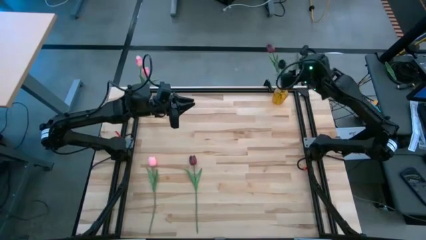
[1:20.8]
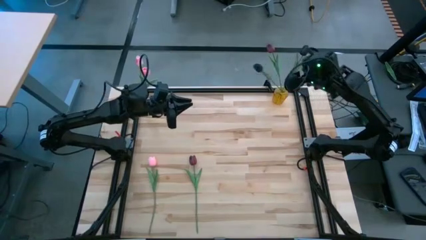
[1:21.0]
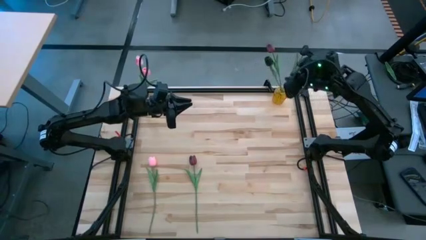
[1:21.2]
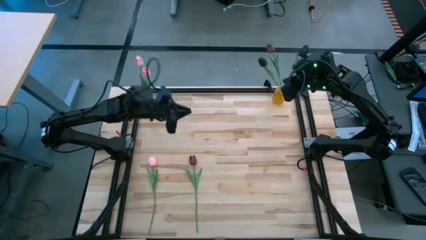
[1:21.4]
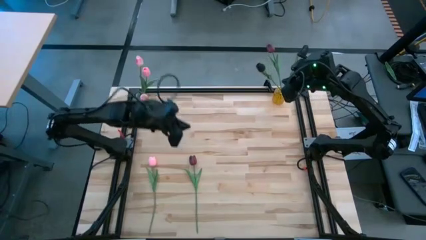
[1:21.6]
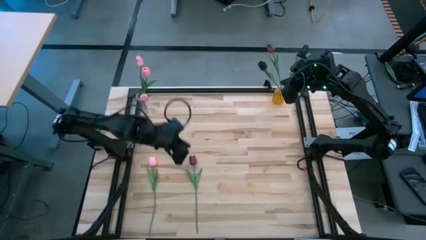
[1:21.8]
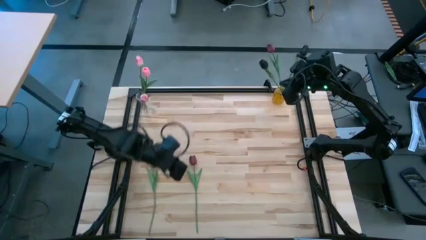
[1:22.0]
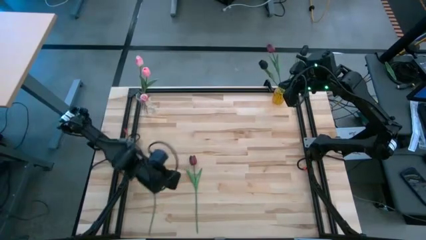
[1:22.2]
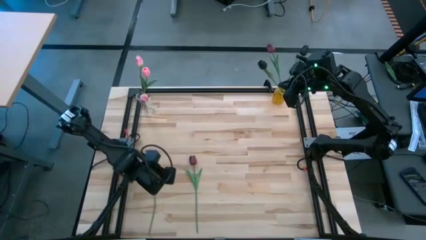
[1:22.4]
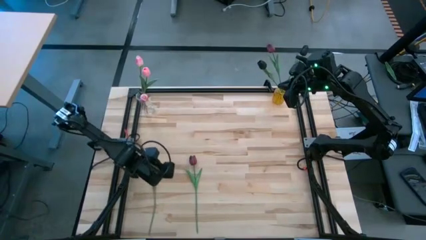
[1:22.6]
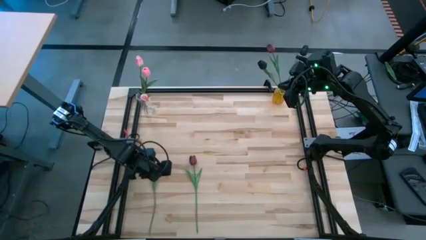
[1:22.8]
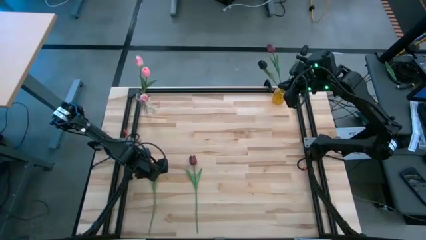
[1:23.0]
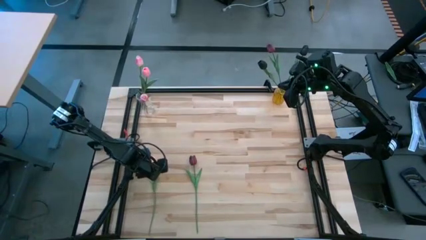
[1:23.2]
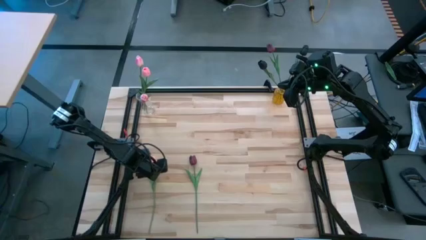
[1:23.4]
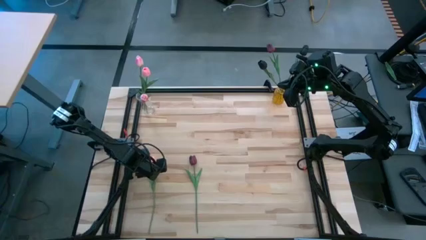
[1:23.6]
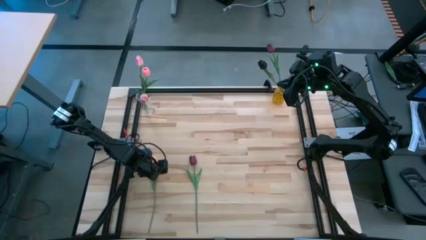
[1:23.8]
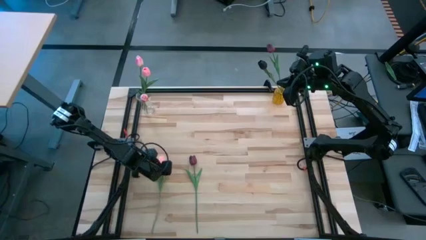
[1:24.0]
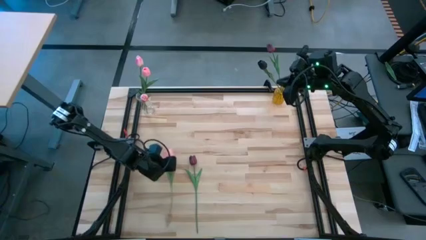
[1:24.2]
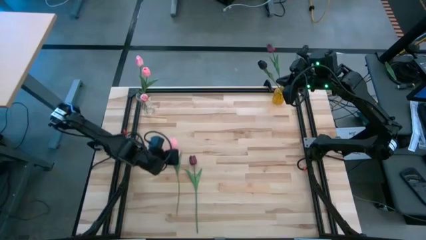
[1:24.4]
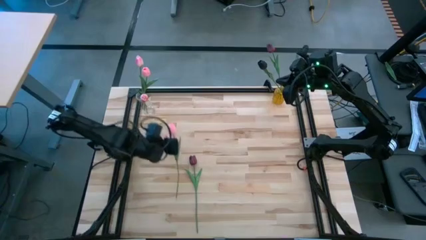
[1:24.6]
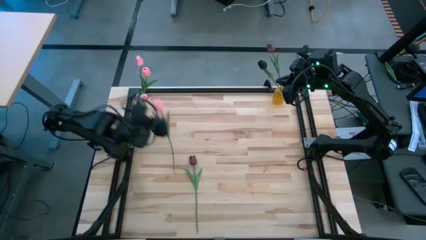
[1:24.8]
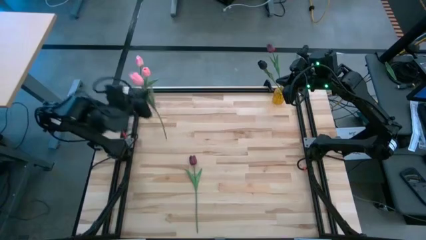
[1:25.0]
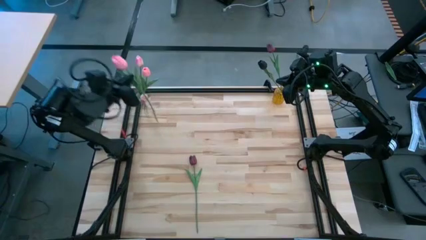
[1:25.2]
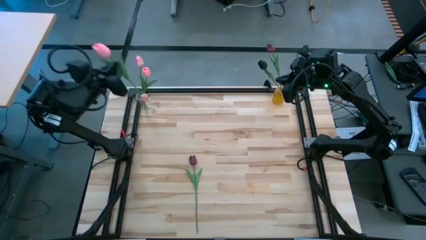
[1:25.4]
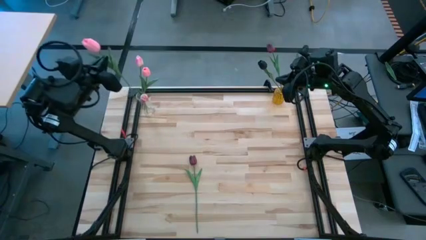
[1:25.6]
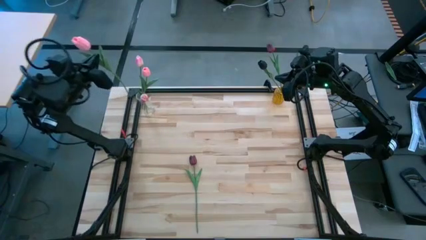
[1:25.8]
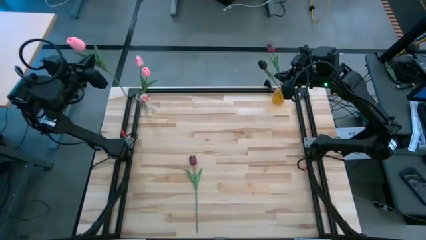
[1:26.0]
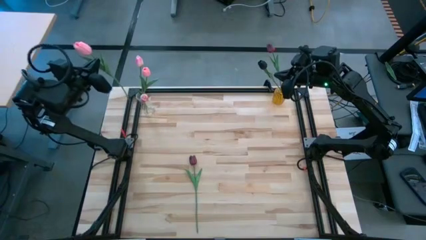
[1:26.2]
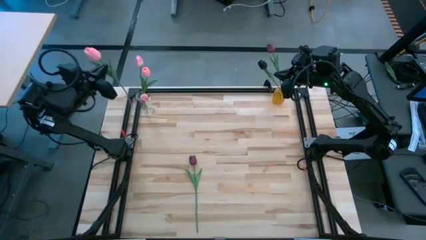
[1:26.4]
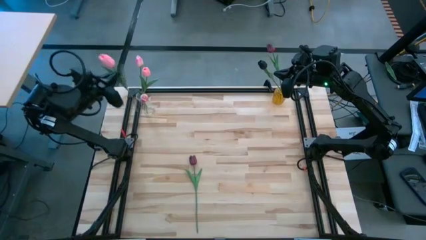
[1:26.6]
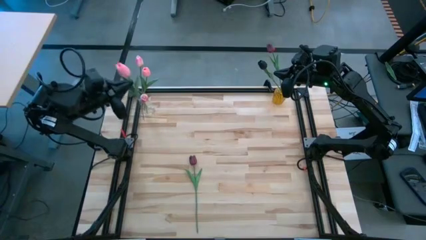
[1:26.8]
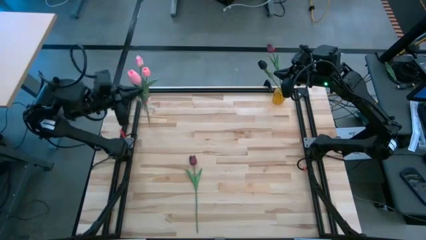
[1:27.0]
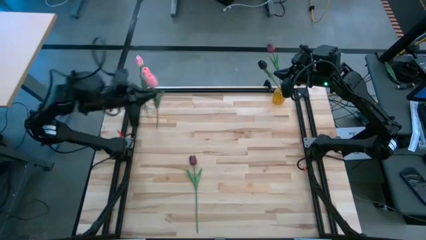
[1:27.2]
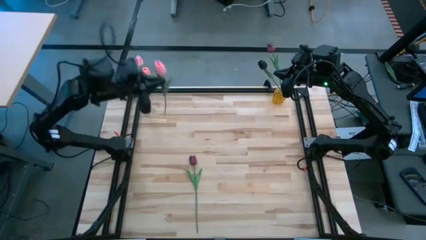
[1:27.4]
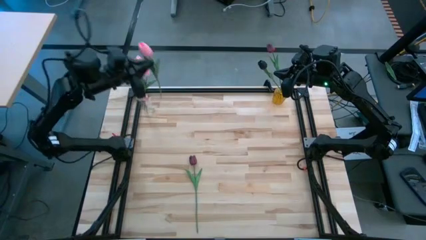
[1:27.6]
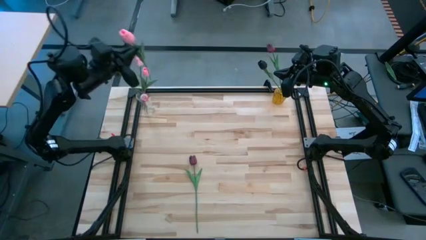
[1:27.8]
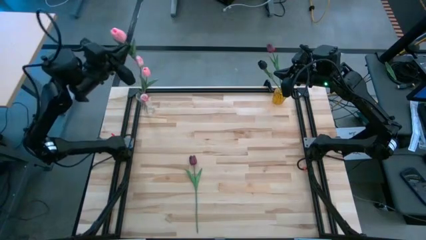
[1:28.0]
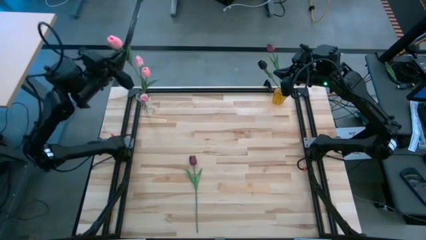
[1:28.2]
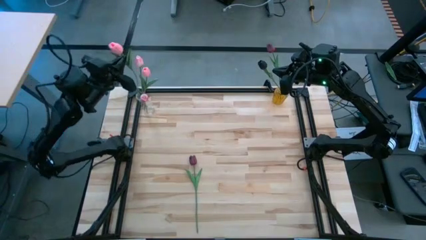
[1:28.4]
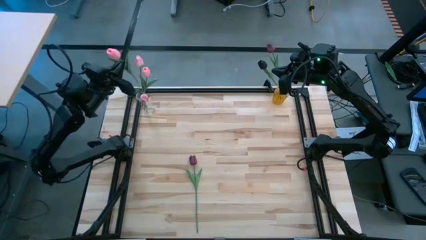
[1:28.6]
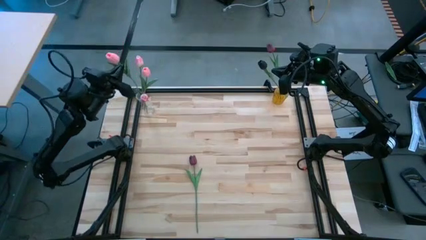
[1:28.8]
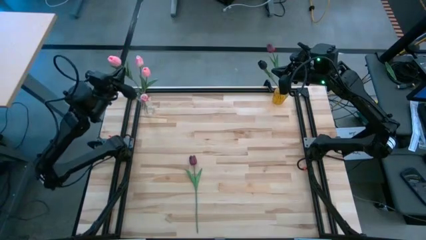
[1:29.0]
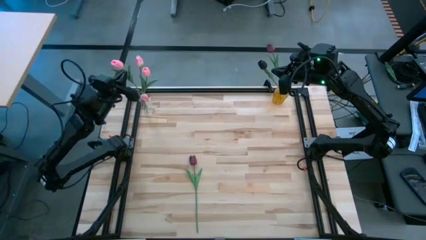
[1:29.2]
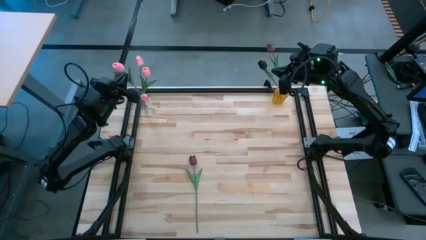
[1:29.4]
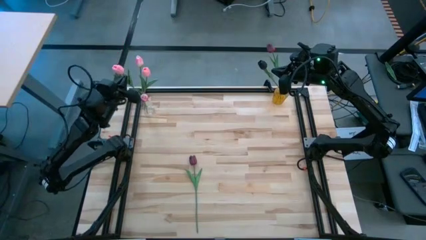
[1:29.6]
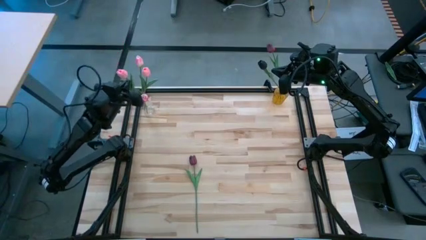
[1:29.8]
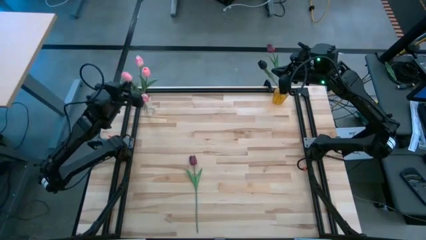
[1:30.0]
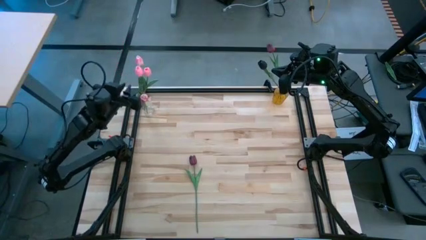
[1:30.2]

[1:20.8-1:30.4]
Task: Sort flowers into vase by color
Put the pink flower into the transparent vase

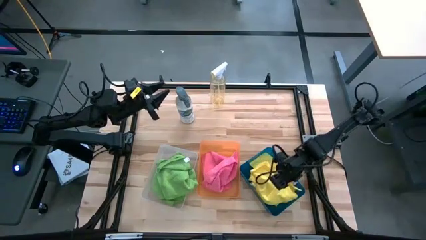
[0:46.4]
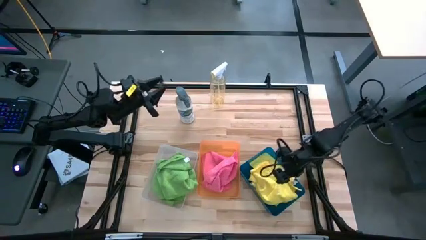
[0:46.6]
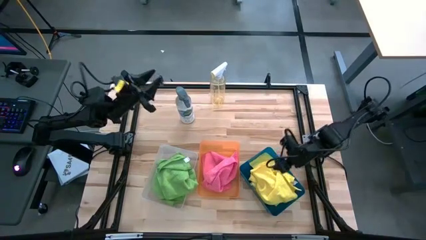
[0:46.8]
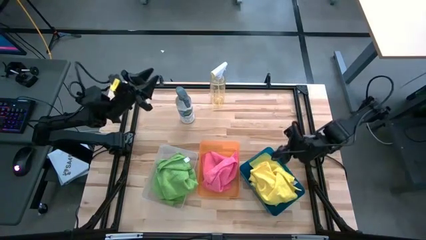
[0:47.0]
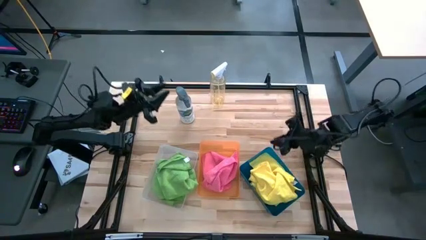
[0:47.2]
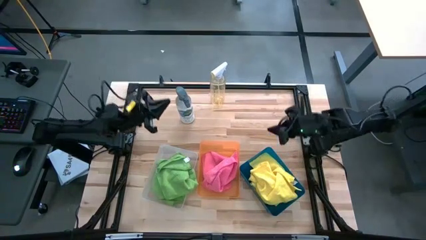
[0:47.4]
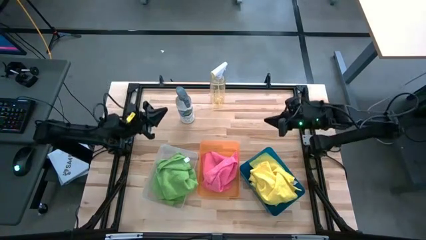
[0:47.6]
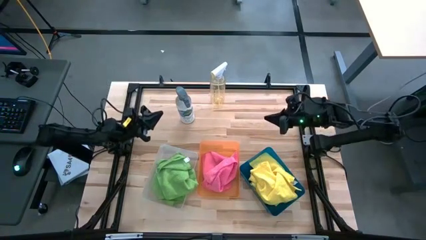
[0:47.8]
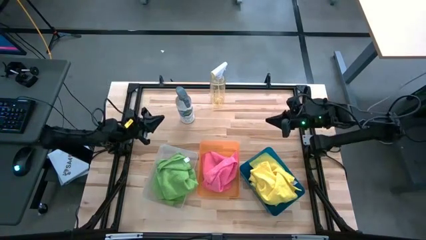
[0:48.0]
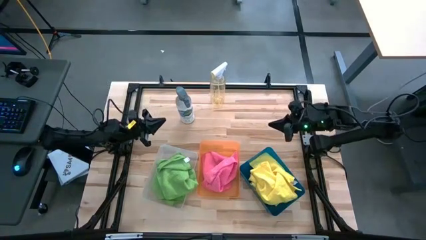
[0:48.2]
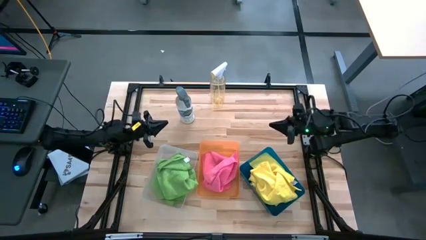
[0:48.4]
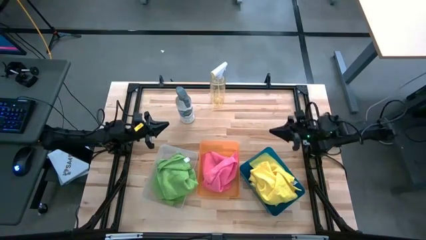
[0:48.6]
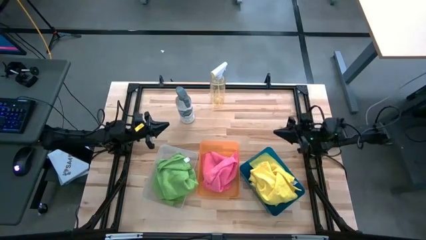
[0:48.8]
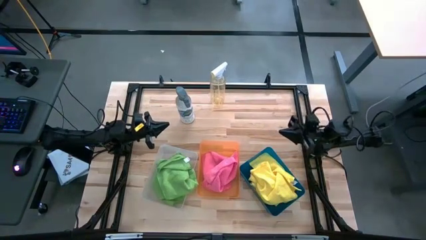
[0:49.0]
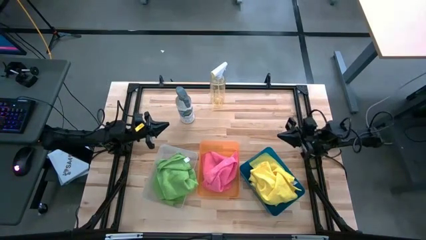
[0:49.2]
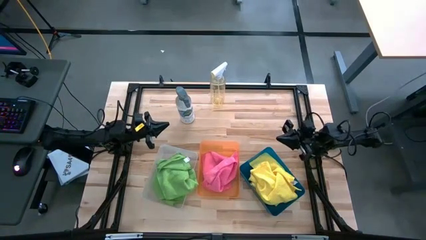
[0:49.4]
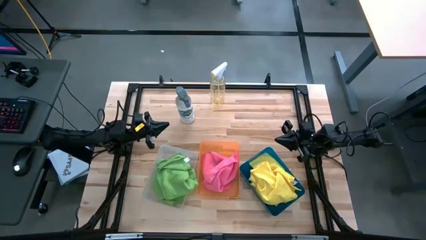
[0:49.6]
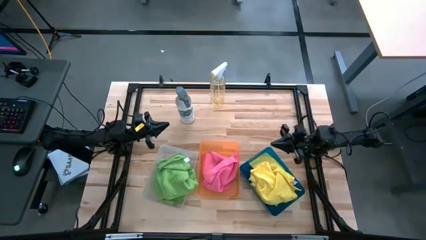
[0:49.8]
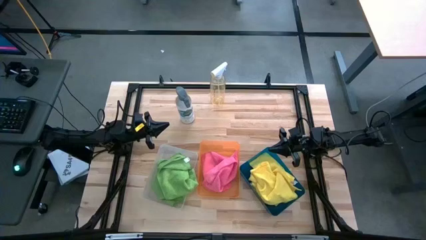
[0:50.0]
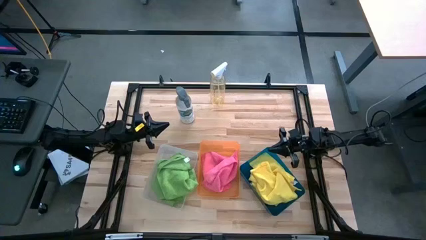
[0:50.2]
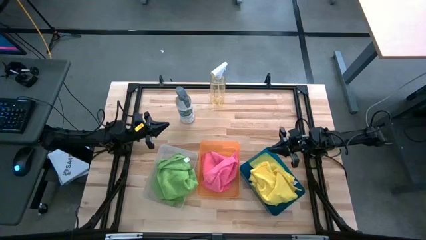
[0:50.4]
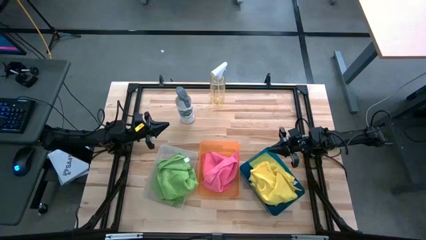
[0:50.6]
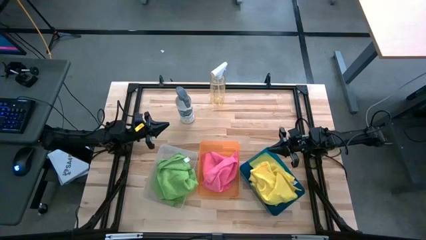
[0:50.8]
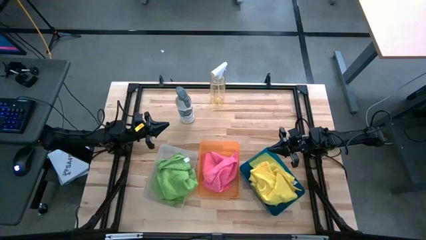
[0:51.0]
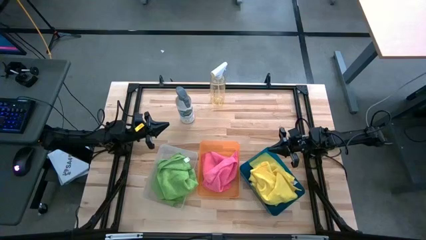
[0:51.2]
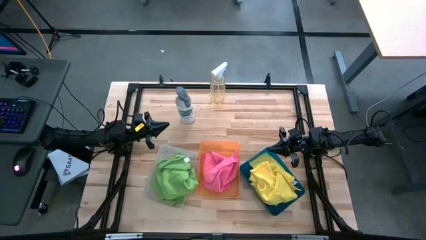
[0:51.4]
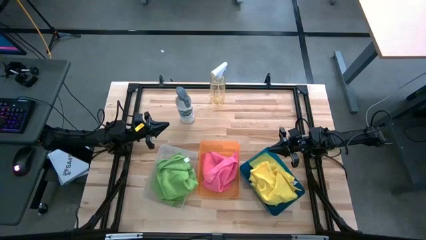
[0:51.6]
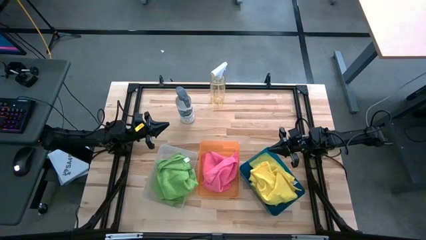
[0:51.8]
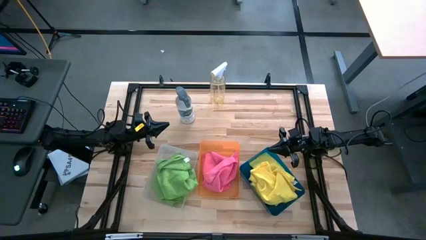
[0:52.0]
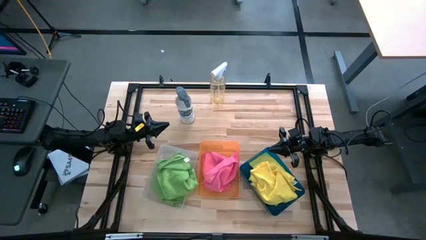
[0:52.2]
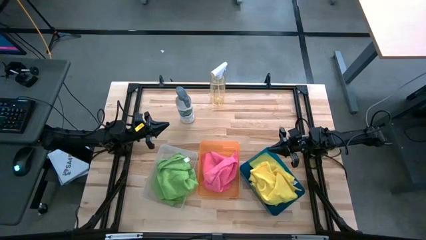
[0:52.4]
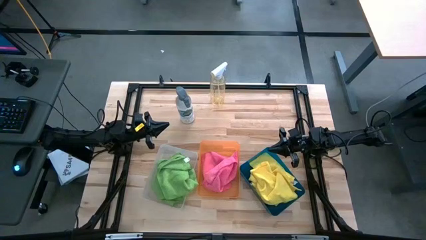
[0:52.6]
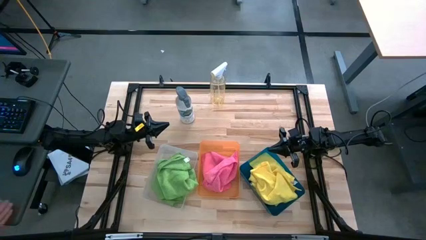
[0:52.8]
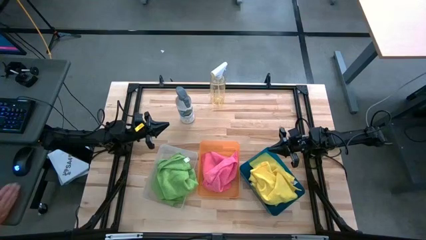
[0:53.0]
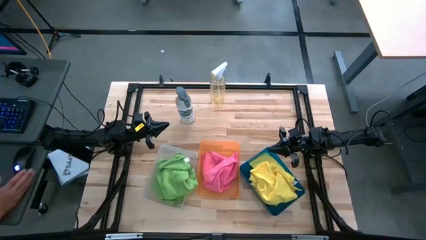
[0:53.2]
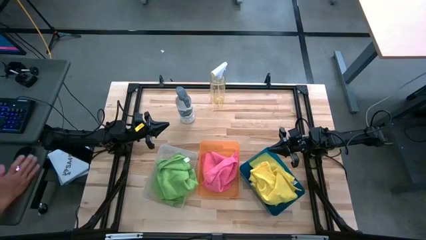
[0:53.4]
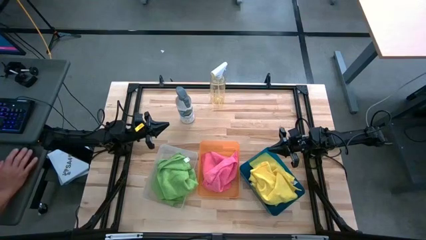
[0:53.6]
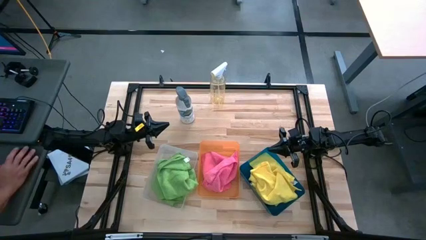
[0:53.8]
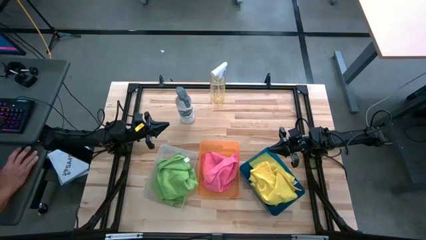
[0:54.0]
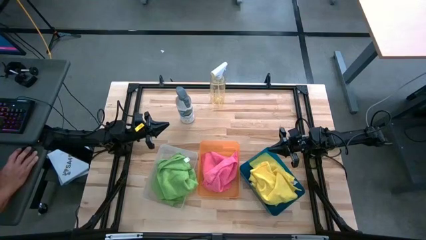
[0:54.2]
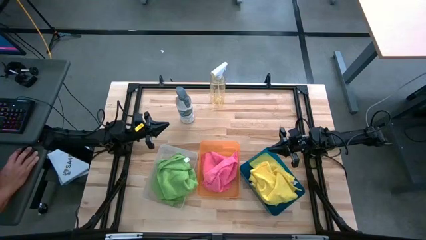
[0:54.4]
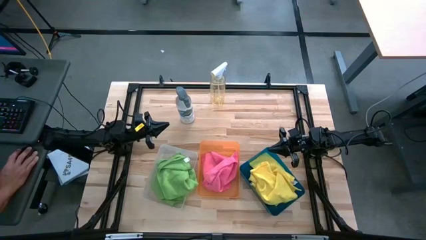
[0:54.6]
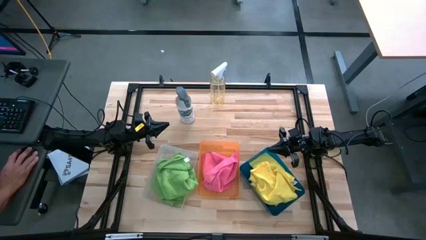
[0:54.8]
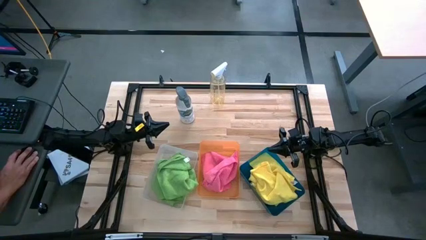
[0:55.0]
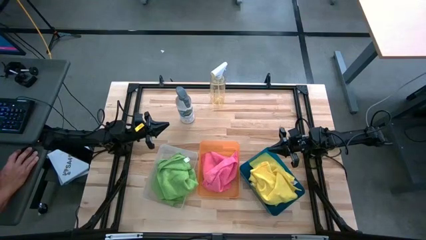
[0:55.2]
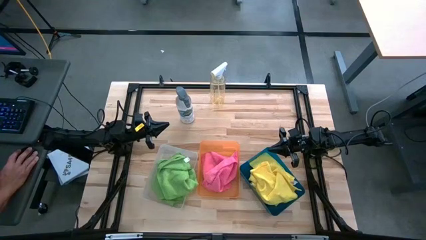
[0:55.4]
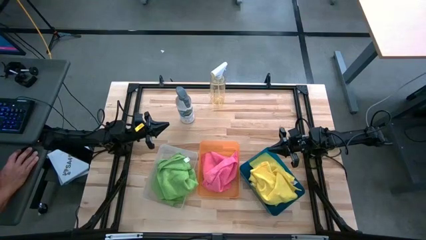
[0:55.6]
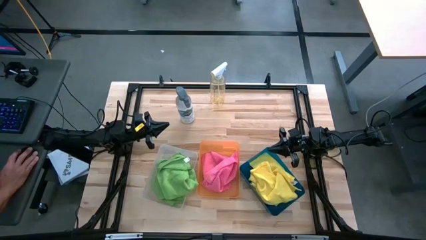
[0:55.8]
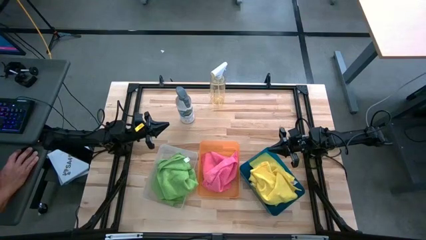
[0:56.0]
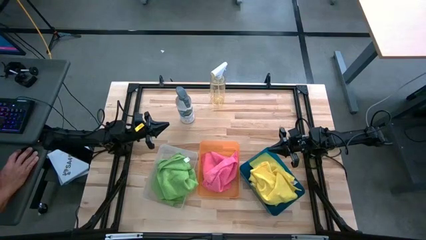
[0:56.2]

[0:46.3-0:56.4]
Task: Sort microfiber towel by color & place in baskets
Return to Home Position
